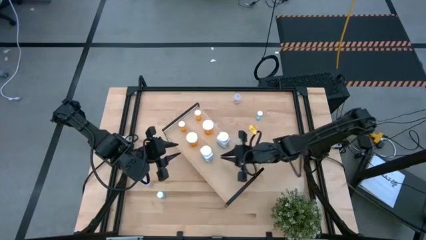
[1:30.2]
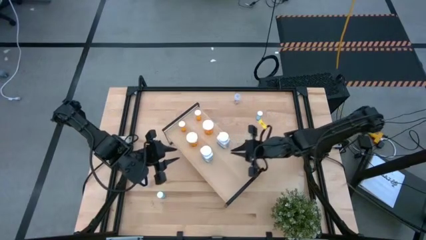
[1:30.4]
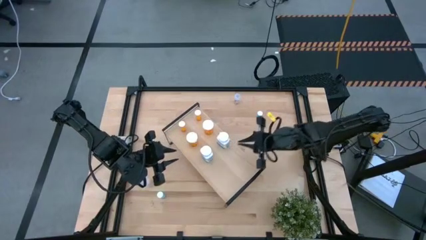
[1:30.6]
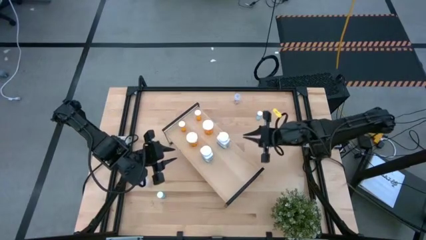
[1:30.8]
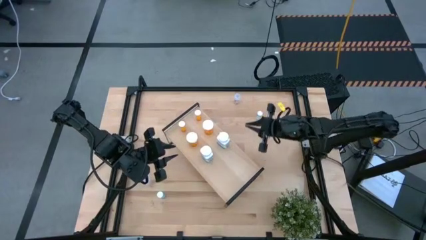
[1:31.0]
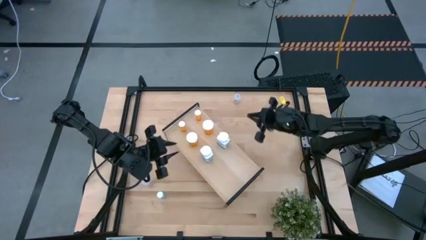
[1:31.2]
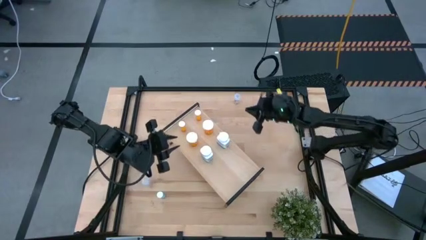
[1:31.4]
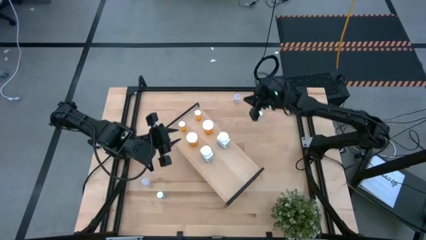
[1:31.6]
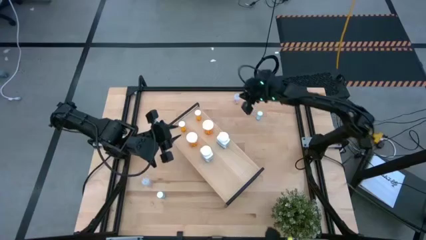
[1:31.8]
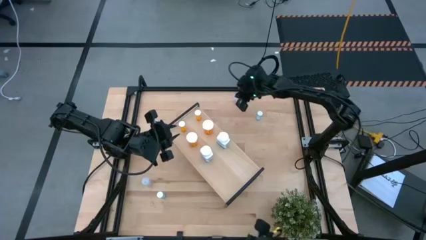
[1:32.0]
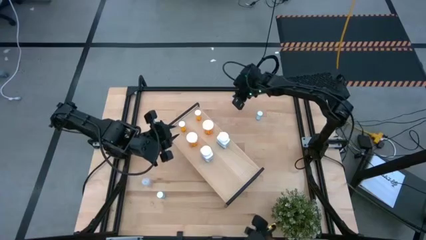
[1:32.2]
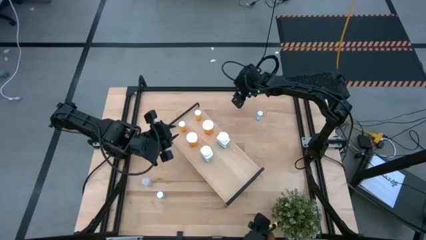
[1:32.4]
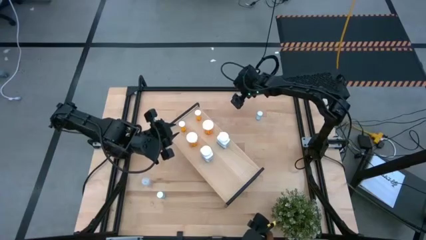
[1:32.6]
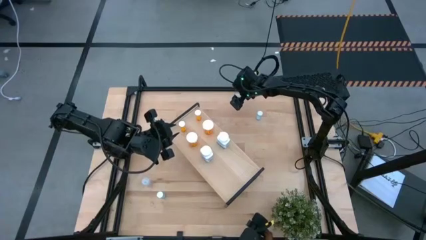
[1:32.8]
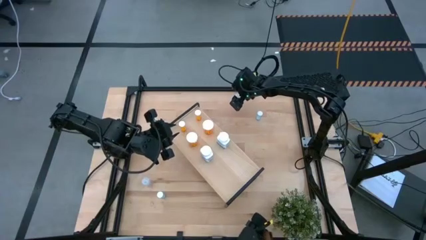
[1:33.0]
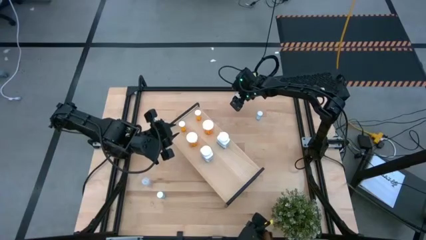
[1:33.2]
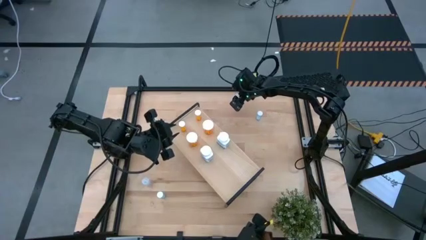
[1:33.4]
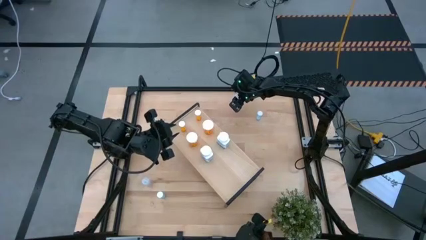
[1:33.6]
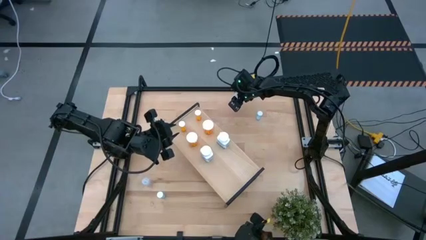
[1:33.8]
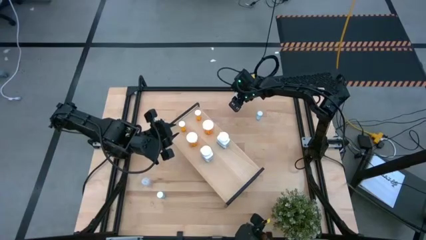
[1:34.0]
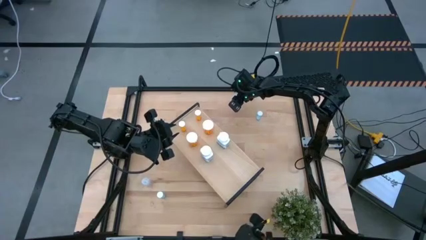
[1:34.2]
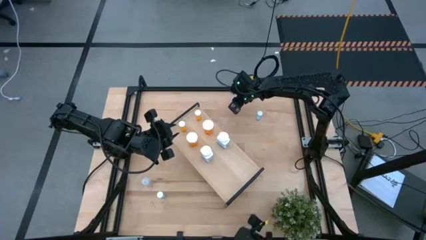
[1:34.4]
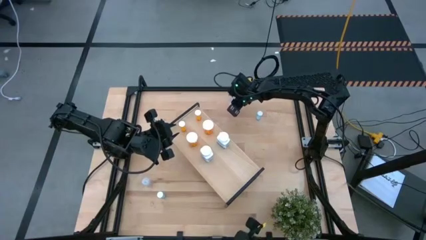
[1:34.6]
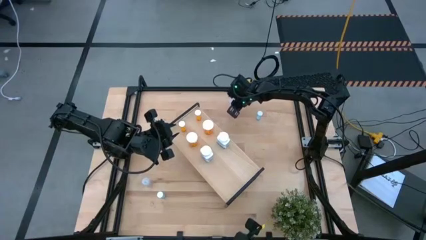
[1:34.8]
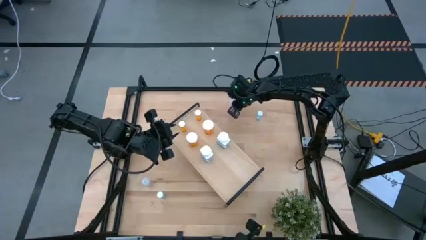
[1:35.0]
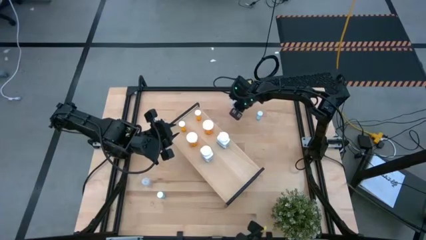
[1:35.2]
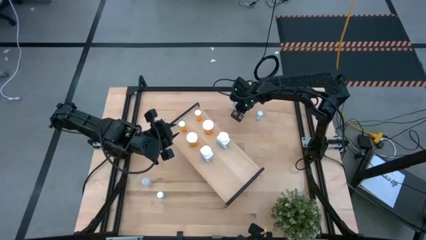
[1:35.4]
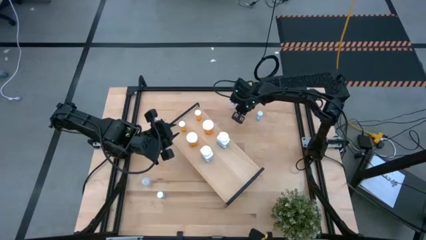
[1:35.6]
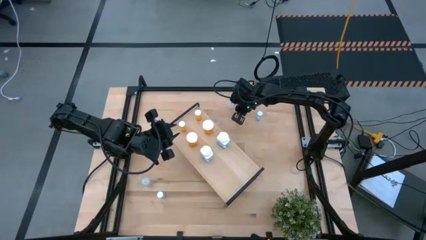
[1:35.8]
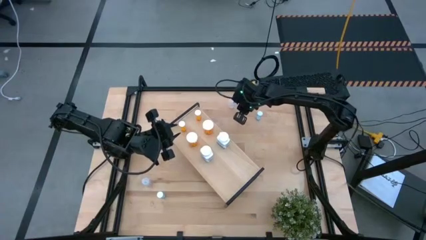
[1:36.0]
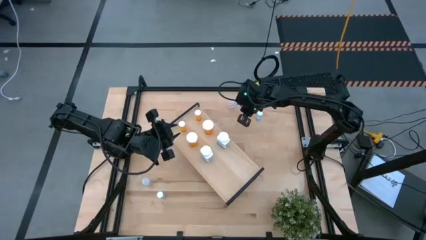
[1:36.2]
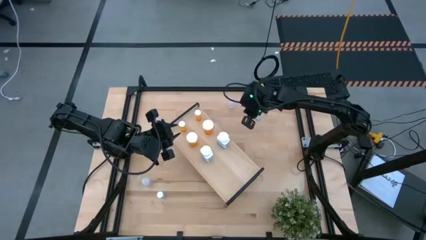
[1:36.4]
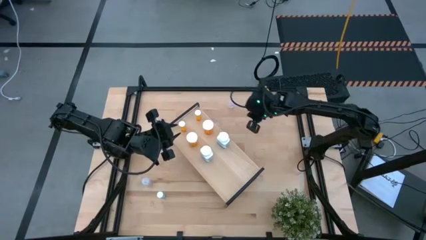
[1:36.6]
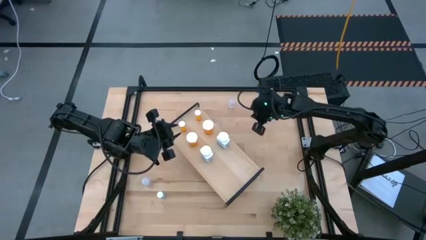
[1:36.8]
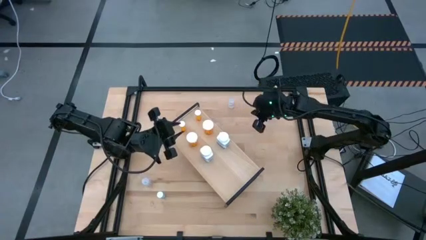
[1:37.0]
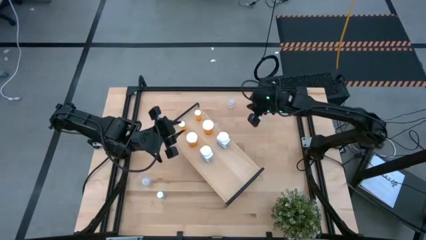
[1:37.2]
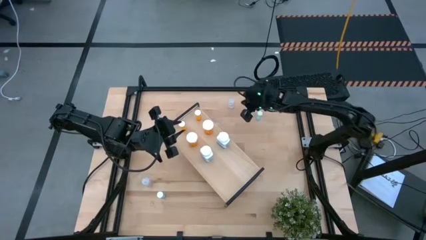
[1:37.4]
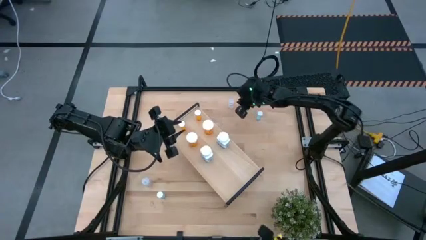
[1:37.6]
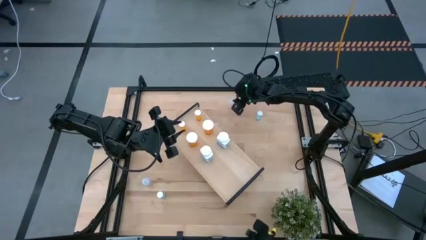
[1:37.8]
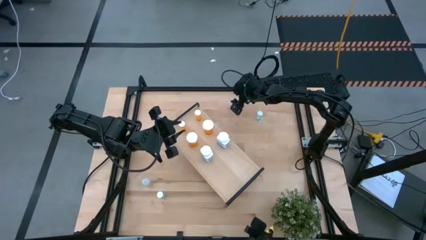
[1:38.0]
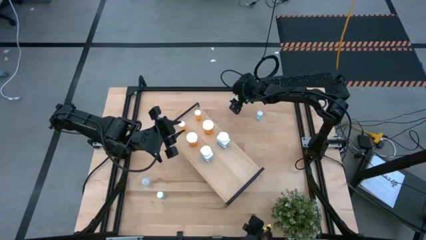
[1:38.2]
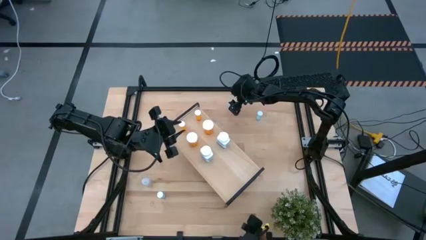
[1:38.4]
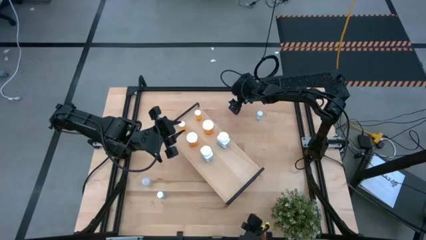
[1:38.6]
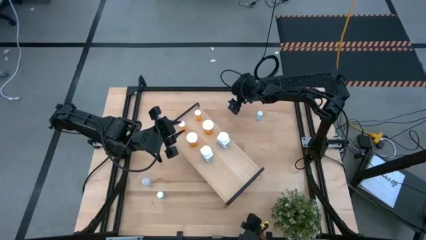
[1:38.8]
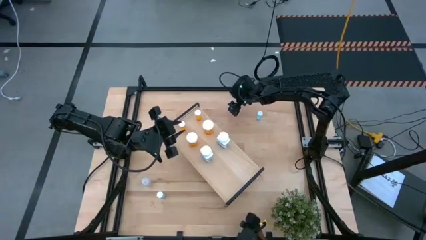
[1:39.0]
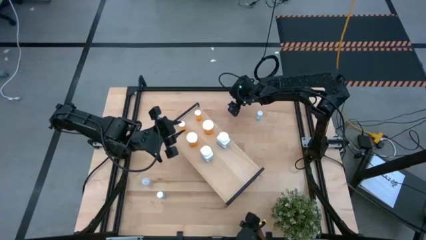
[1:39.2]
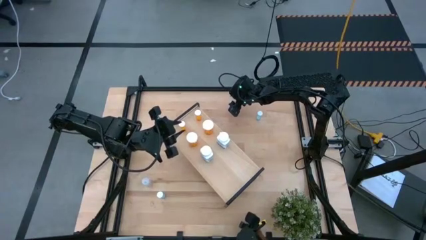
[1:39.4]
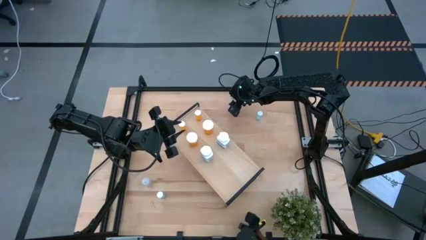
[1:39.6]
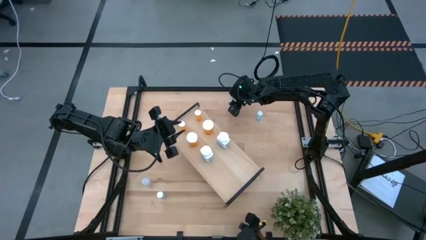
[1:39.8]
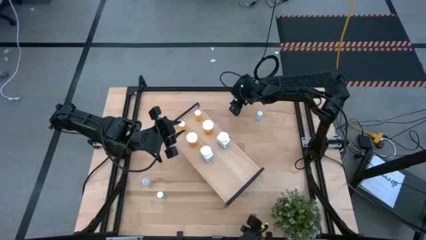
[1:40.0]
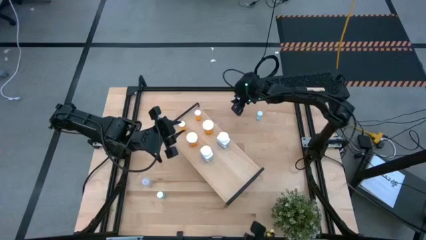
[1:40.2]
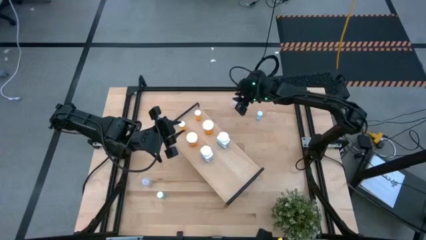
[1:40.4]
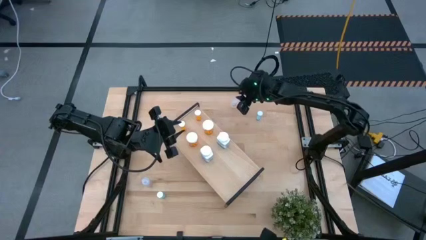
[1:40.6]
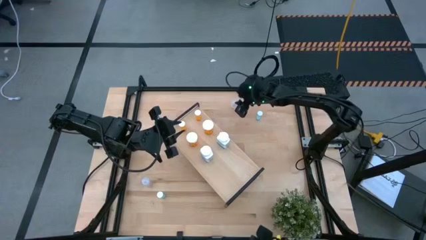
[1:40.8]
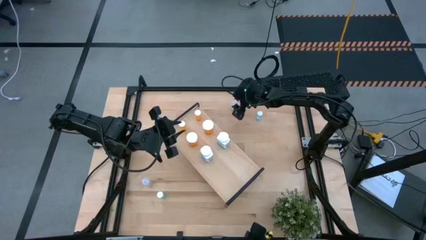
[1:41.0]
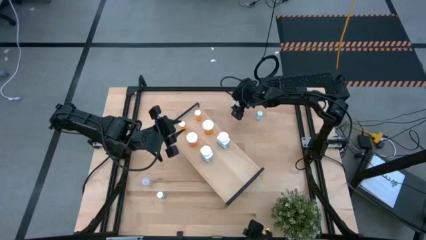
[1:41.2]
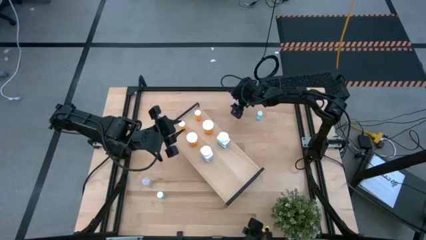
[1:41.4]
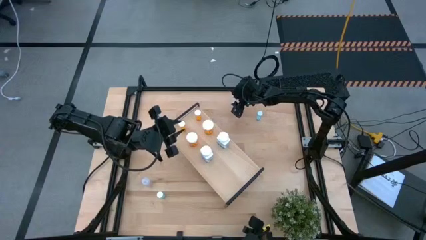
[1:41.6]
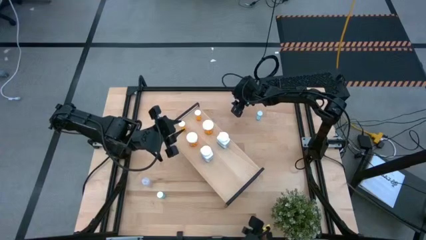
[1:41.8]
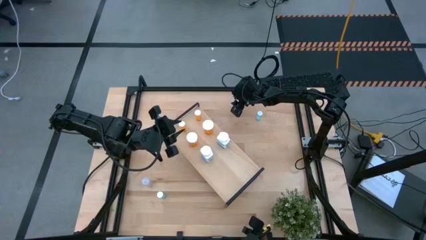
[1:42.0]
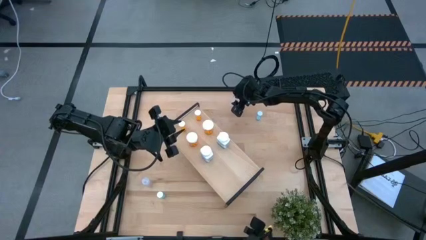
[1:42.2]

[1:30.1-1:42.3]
Task: Pick and place medicine bottles onto shelf by color
Put the top transparent pill bottle on the shelf
